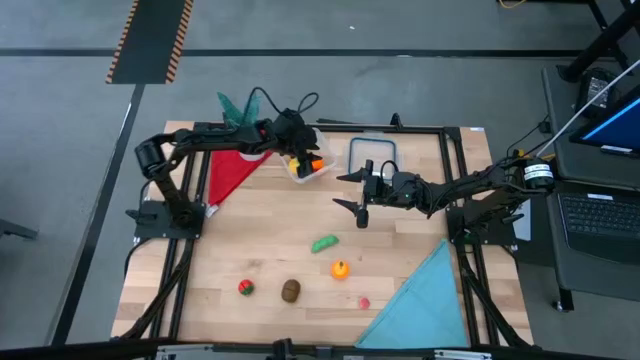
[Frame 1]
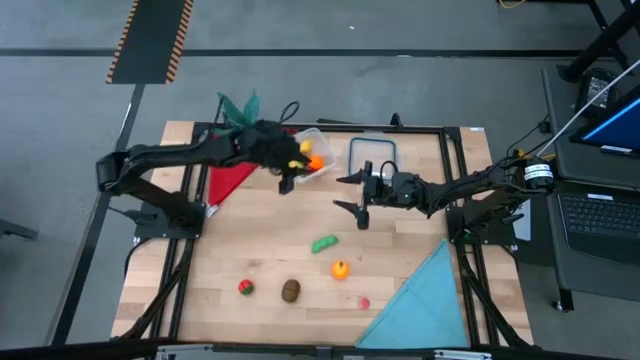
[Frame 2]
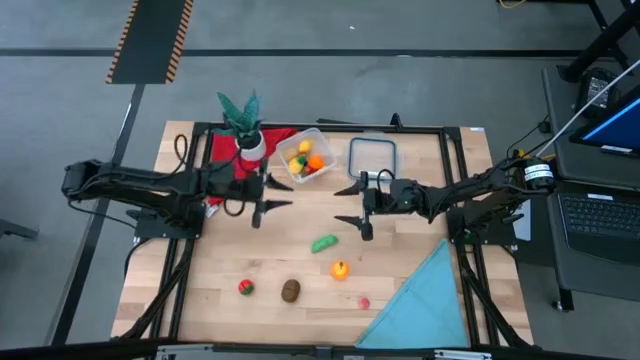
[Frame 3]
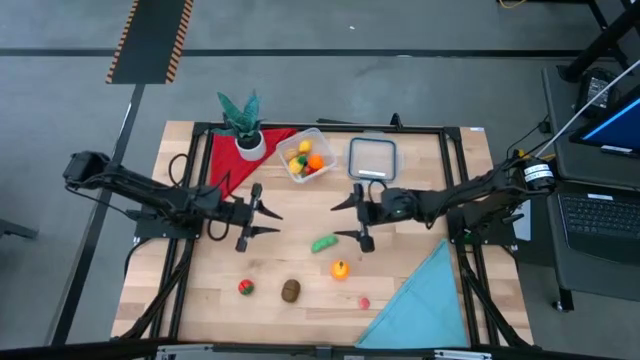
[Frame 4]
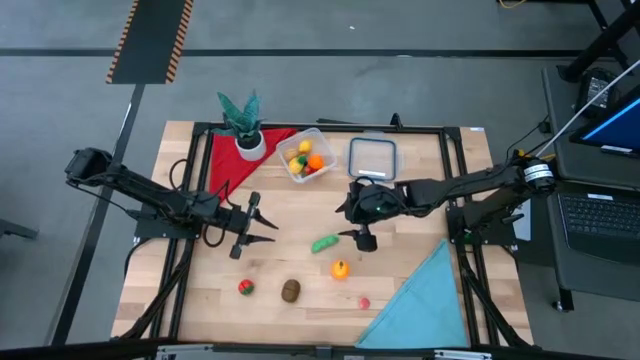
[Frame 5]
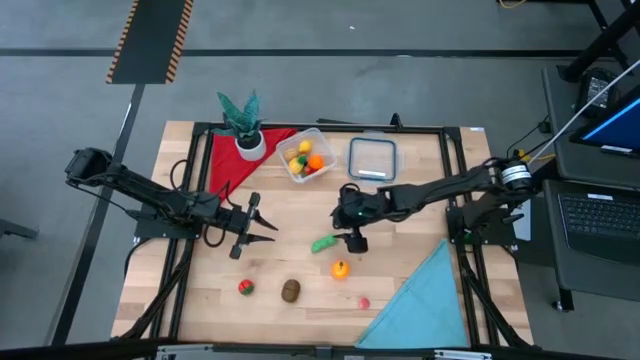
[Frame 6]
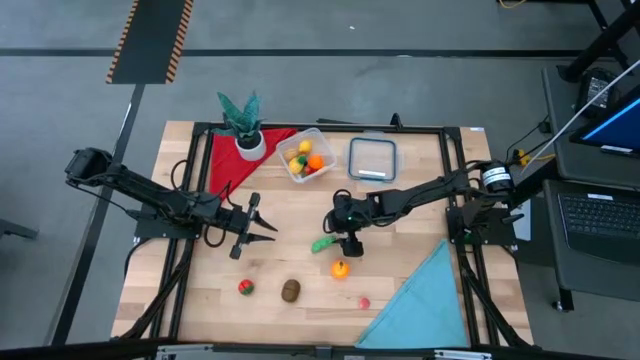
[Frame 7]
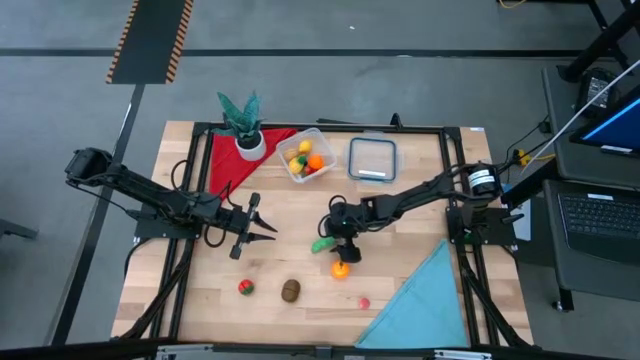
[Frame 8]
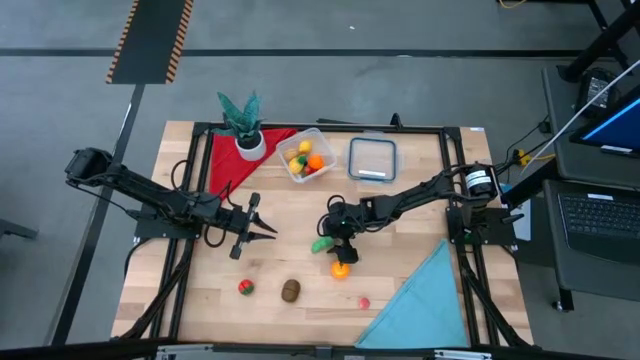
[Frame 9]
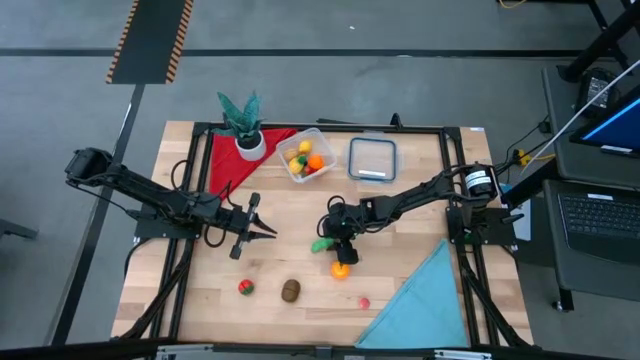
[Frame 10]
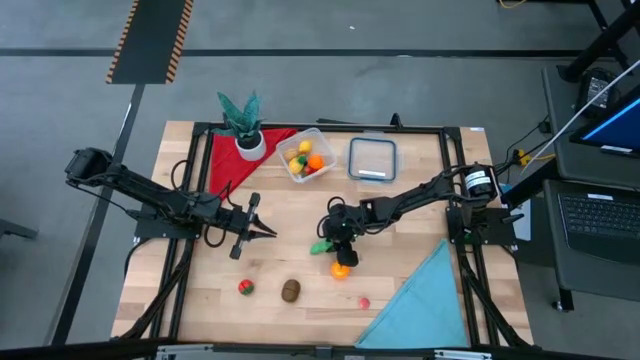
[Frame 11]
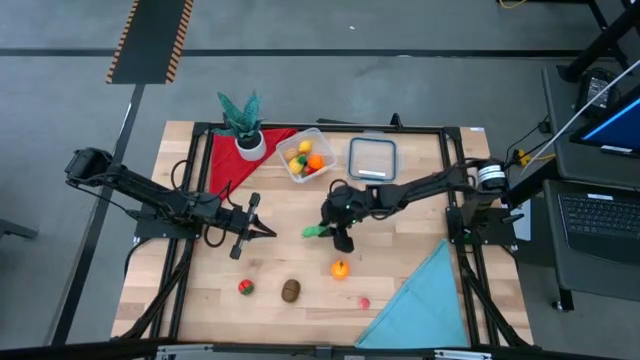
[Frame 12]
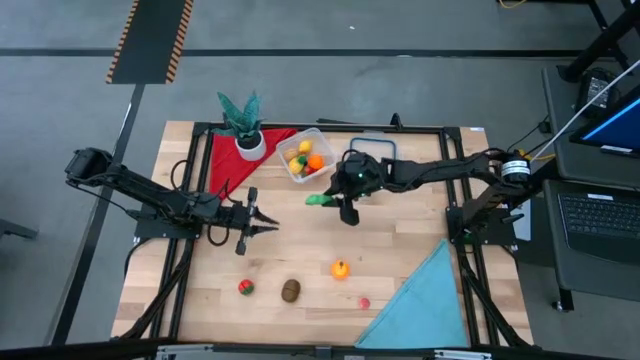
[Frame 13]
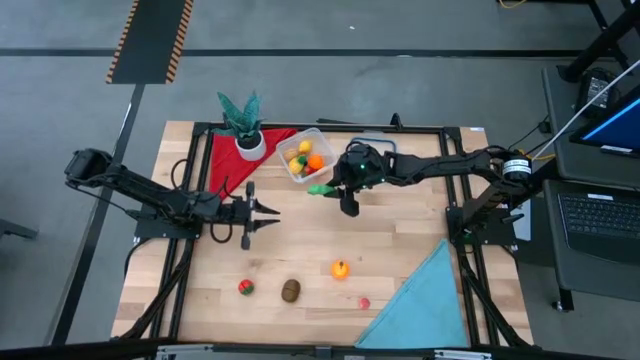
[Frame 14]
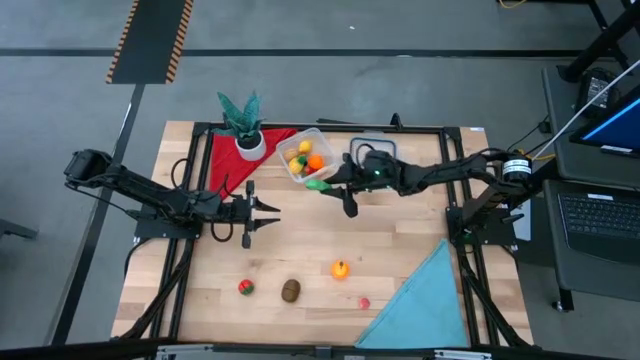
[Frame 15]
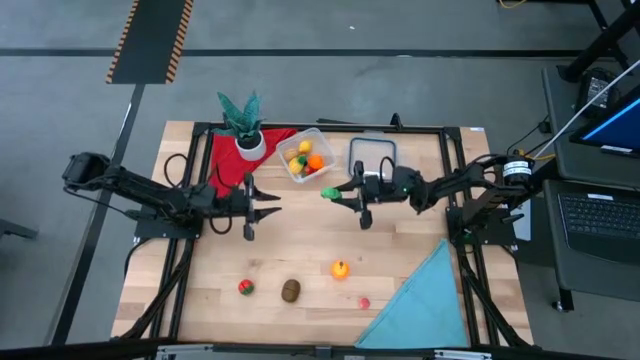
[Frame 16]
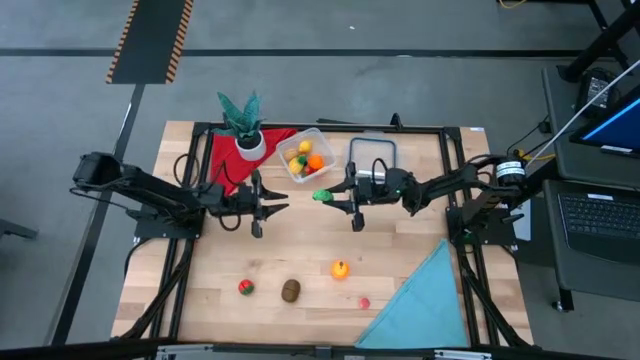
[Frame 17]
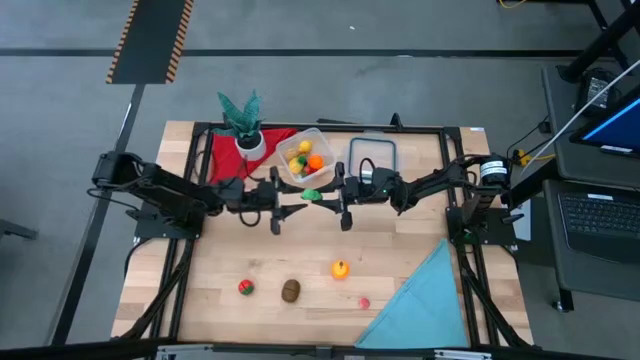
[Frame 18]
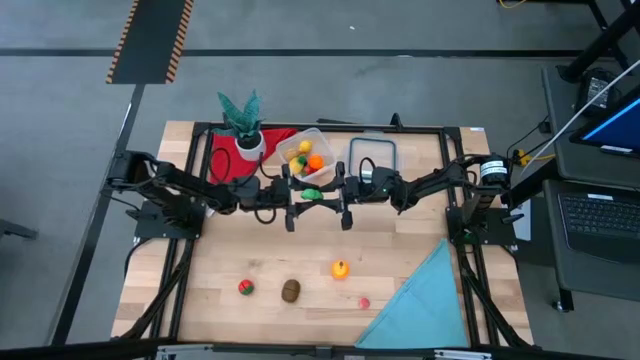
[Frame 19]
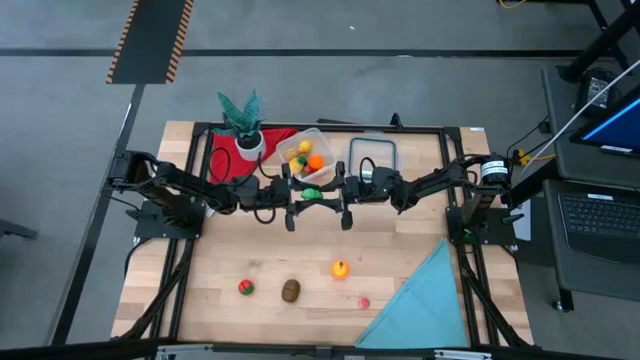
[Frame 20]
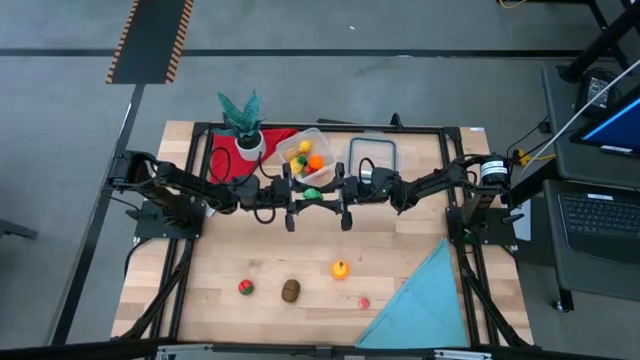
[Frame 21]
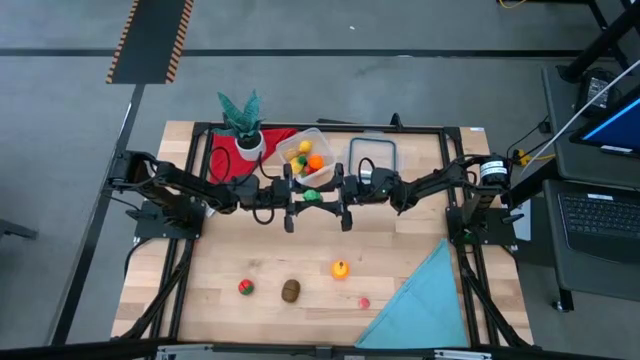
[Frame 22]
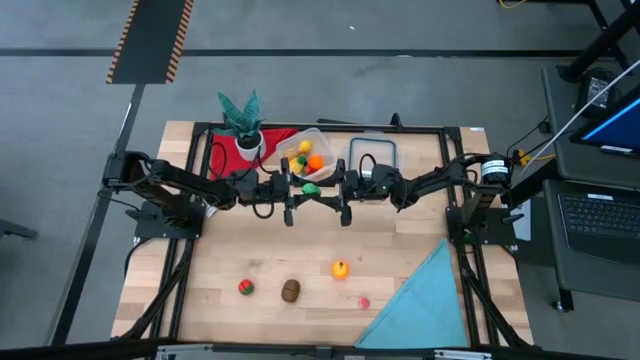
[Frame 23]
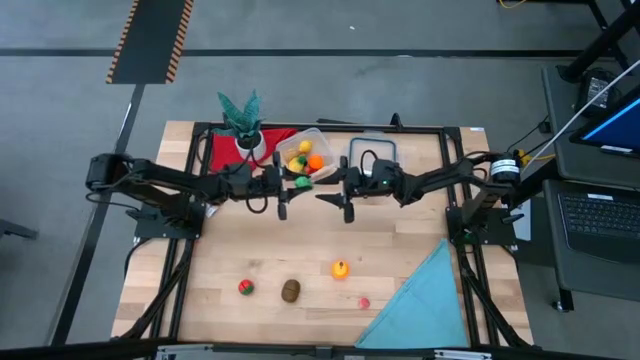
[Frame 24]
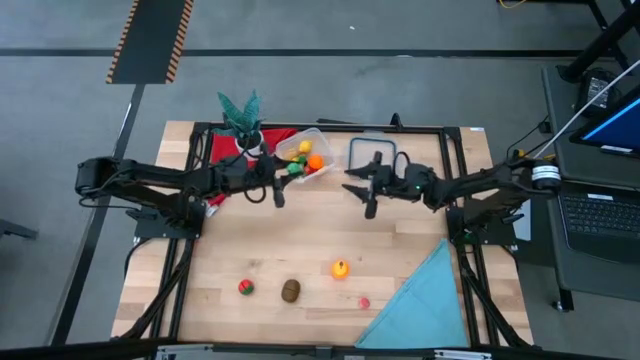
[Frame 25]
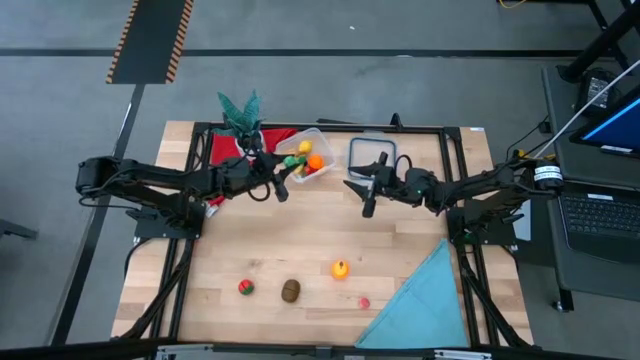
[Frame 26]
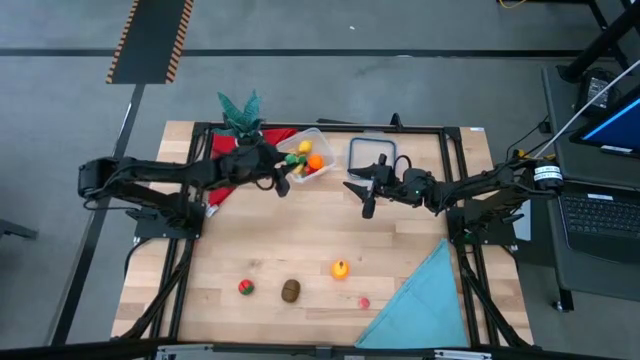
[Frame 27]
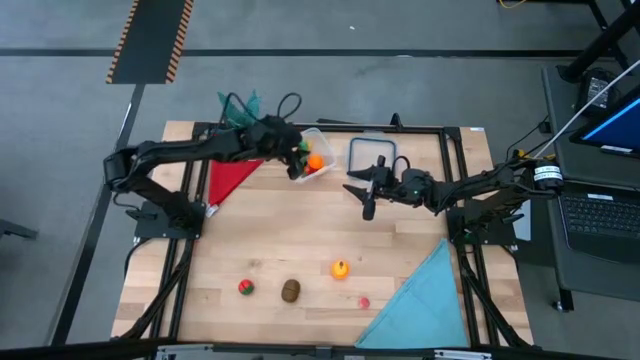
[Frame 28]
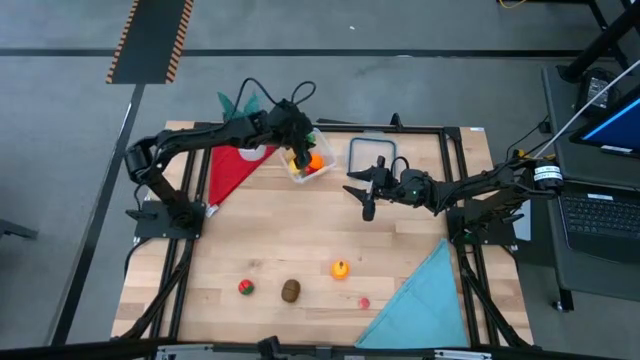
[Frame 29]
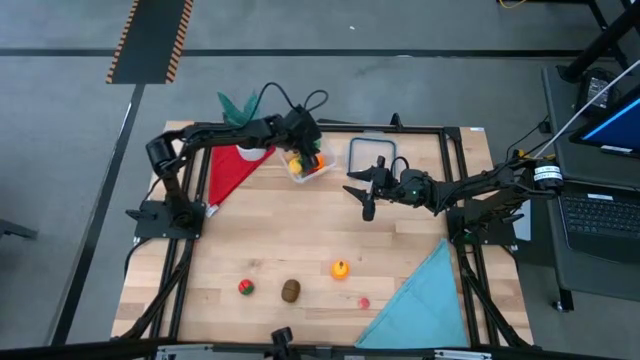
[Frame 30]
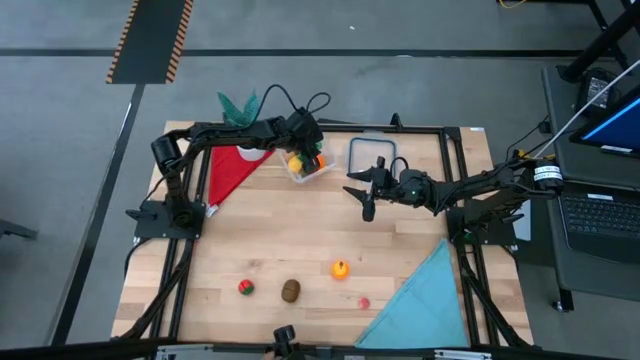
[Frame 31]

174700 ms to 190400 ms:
Task: Pick and placing Produce into tupperware
Put the peas into the transparent bin

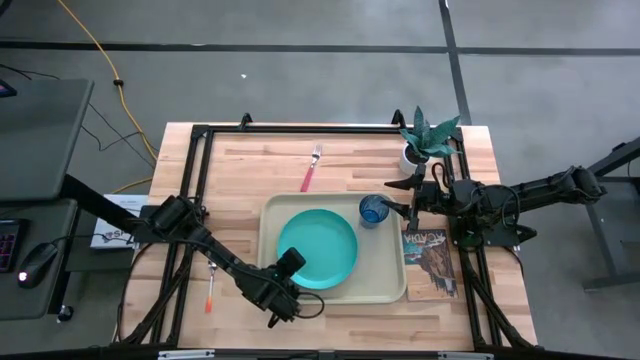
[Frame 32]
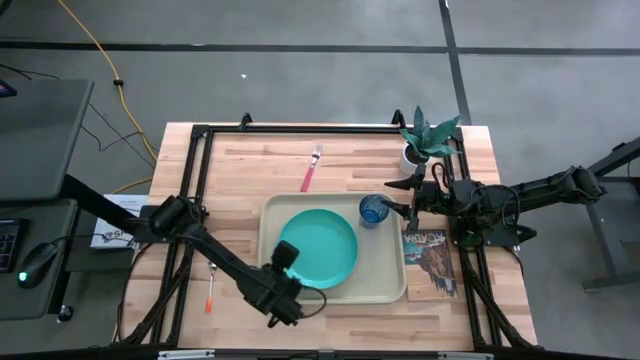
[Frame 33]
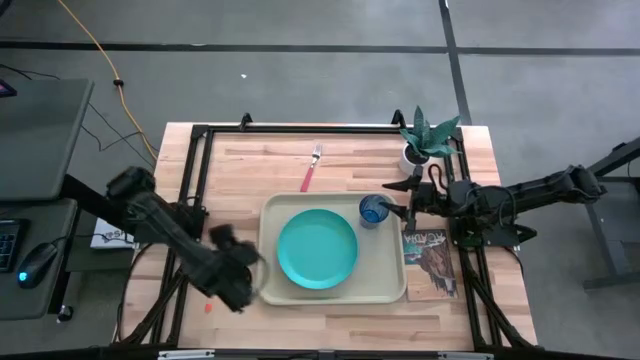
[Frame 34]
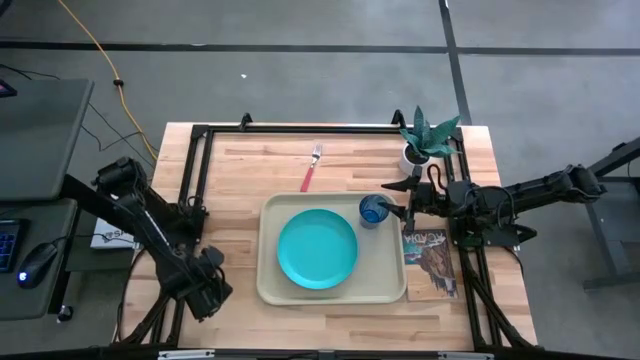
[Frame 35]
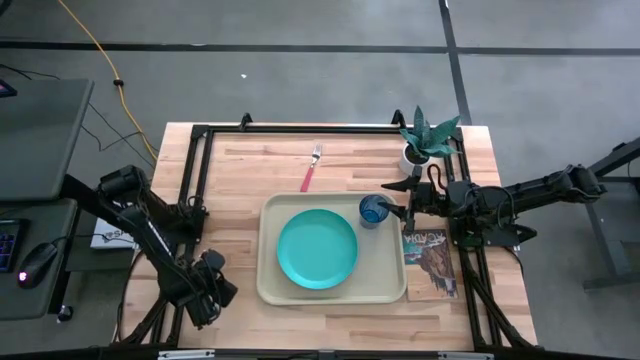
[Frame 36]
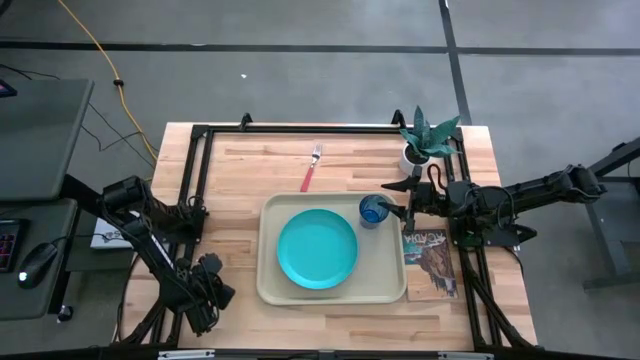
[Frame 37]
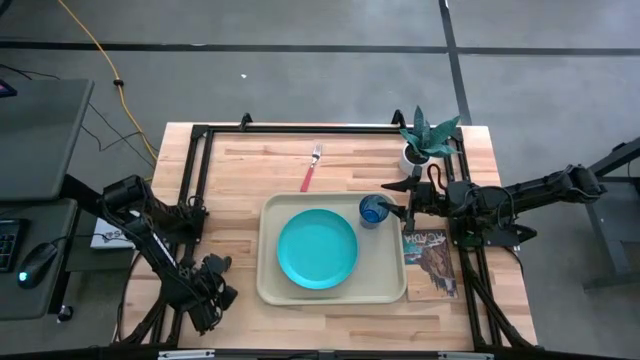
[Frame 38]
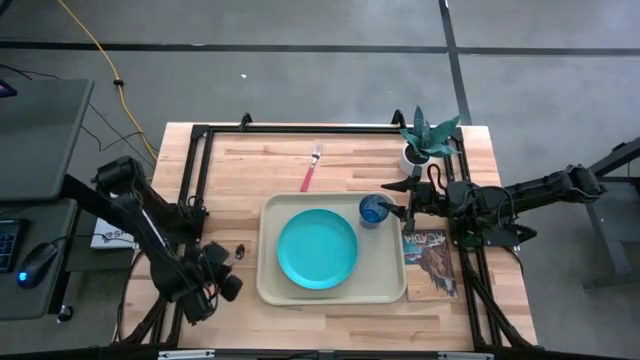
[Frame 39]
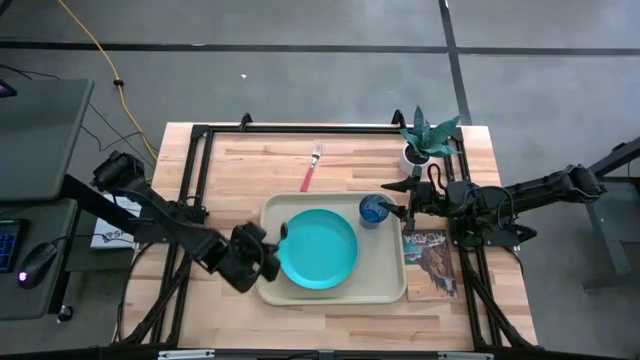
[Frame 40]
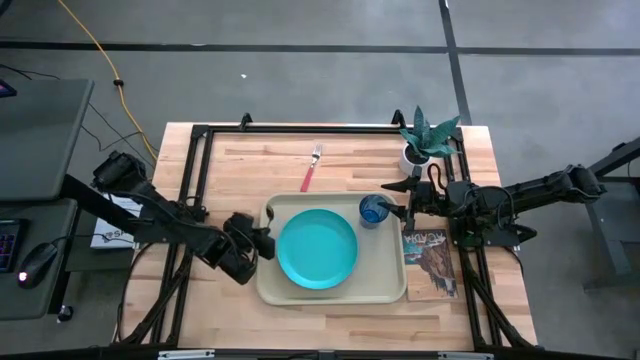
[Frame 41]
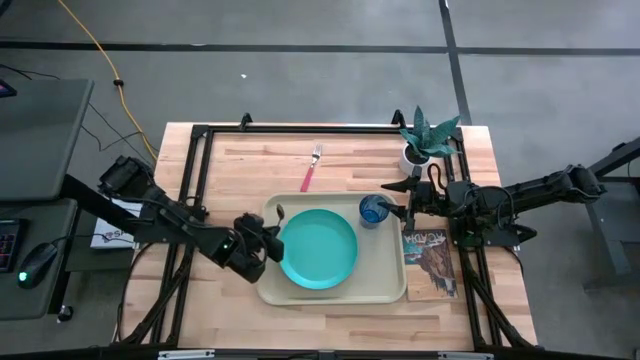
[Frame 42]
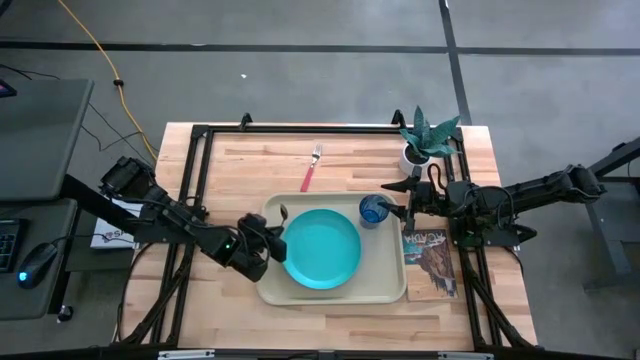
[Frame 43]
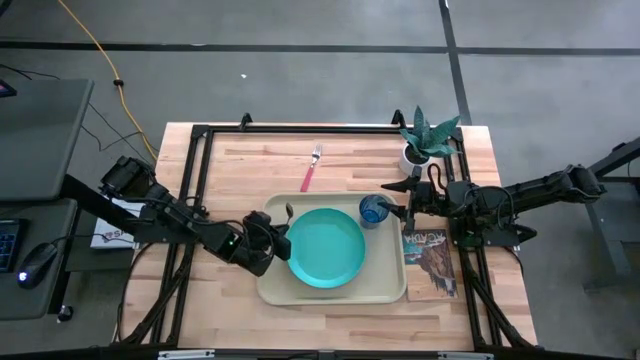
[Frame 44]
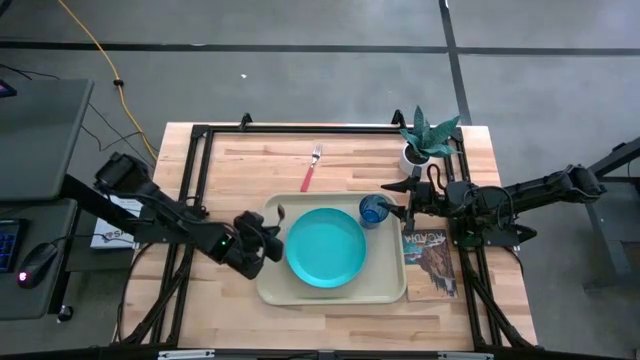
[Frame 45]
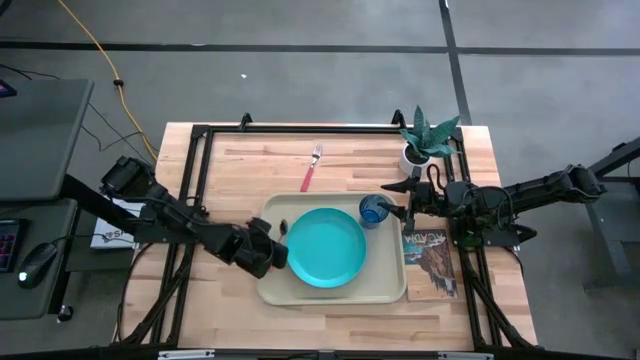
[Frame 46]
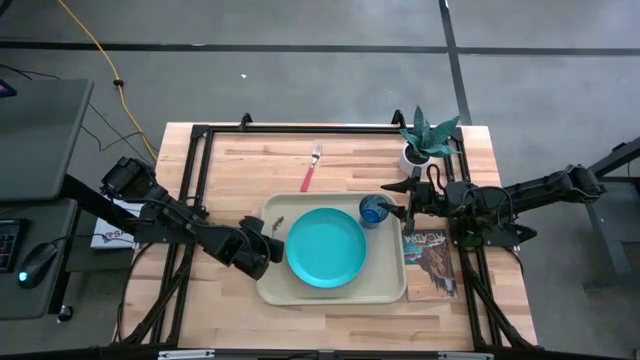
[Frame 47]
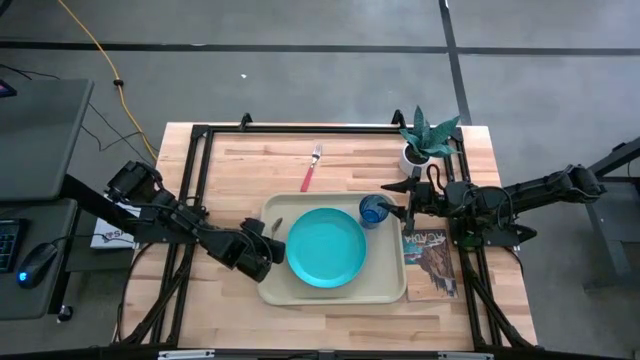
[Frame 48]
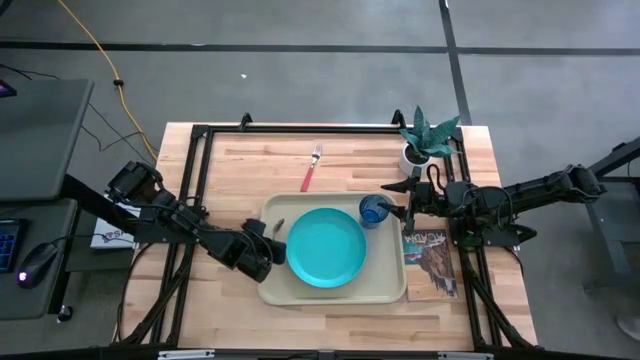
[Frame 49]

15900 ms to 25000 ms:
Task: Pick and place plate/cup/fork/spoon on tray
Put the orange spoon to the left of the blue plate on the gray serving tray
